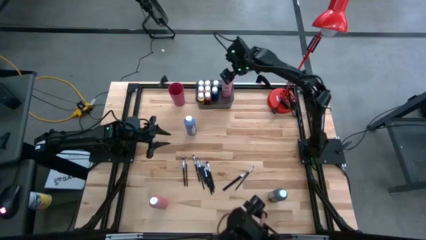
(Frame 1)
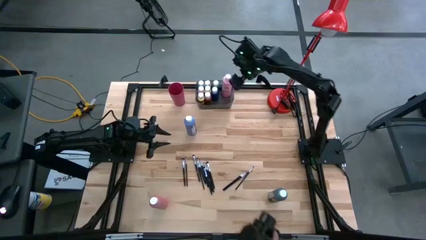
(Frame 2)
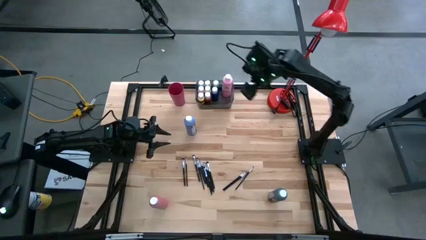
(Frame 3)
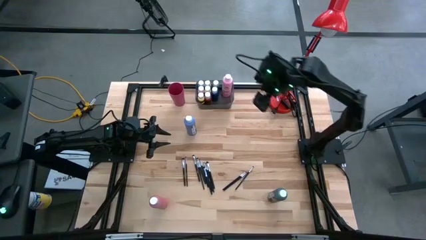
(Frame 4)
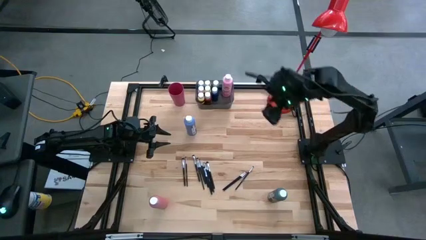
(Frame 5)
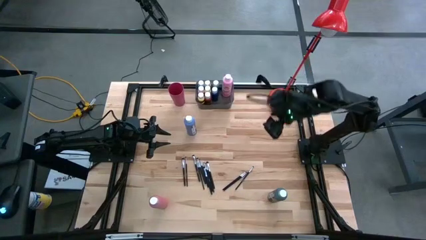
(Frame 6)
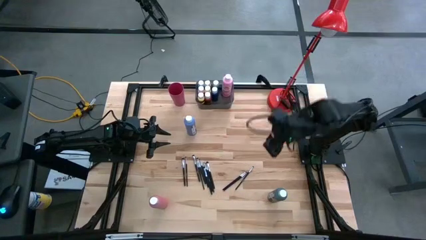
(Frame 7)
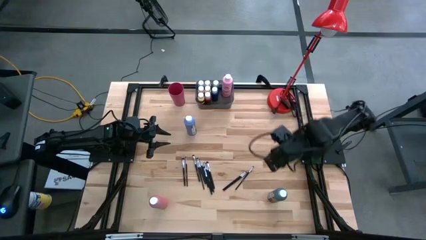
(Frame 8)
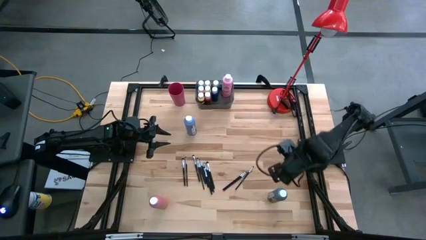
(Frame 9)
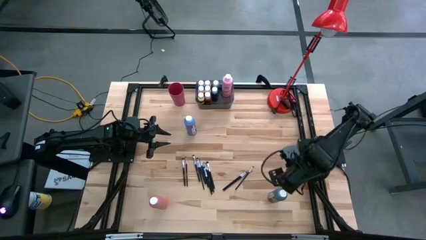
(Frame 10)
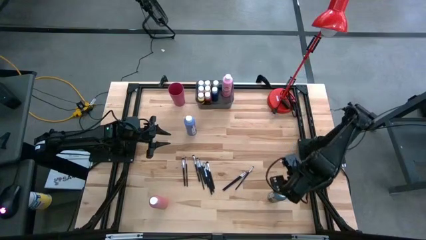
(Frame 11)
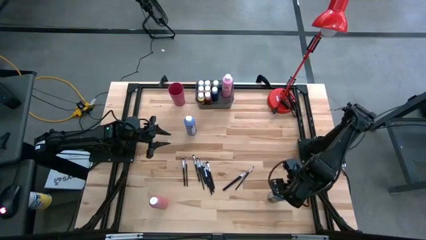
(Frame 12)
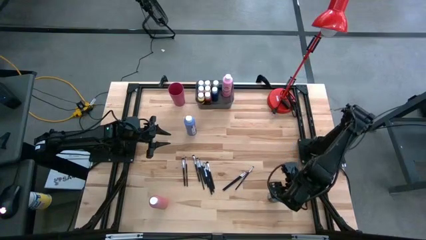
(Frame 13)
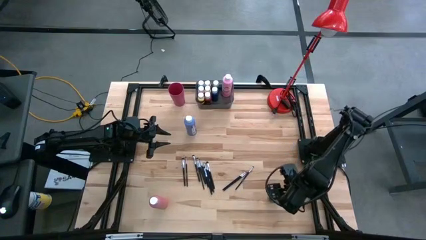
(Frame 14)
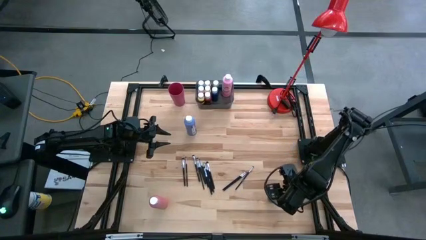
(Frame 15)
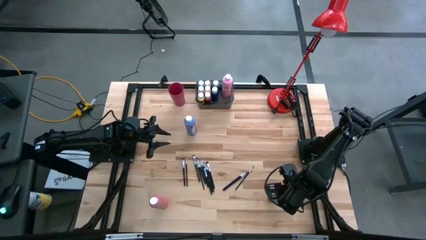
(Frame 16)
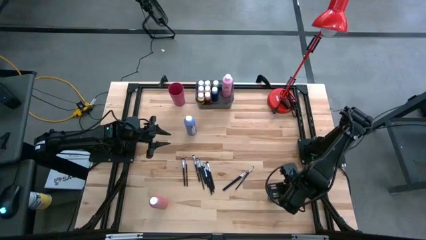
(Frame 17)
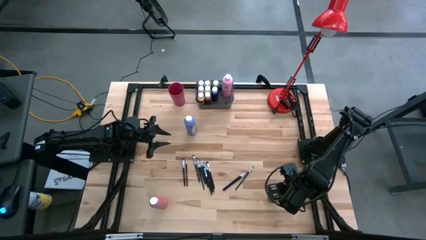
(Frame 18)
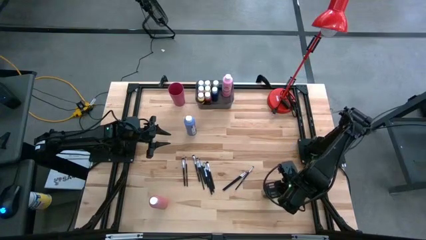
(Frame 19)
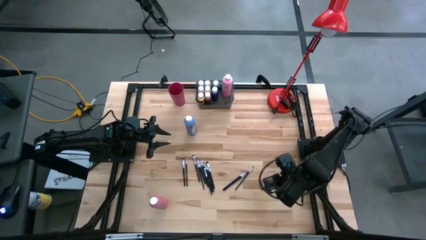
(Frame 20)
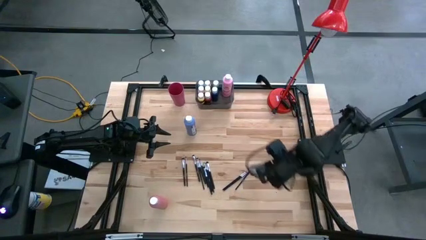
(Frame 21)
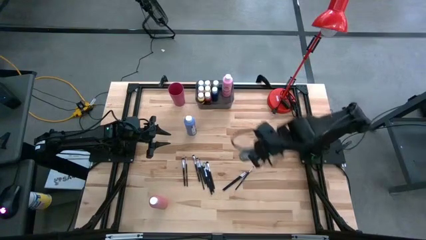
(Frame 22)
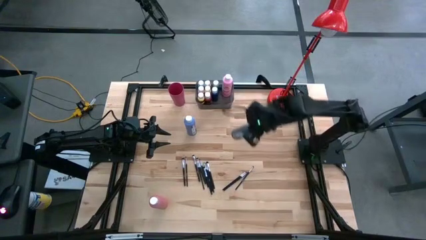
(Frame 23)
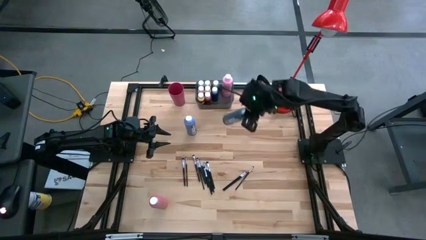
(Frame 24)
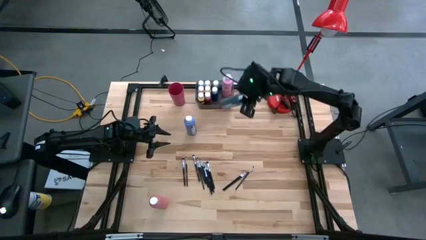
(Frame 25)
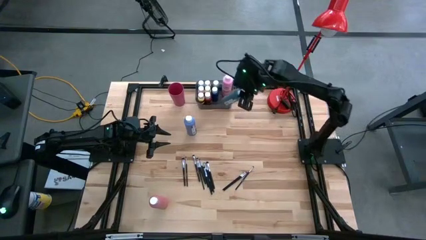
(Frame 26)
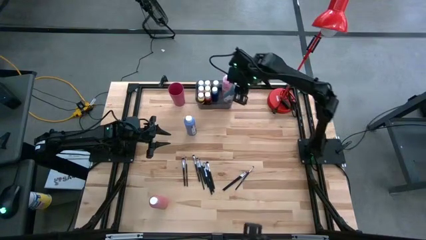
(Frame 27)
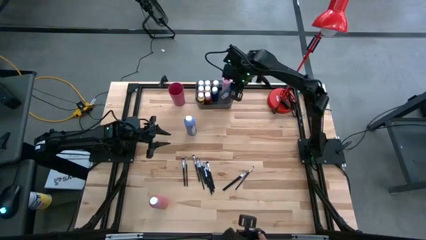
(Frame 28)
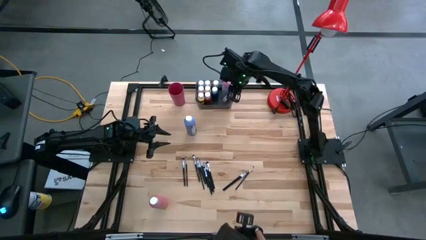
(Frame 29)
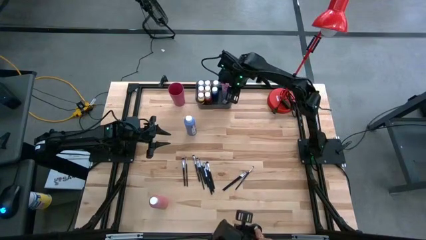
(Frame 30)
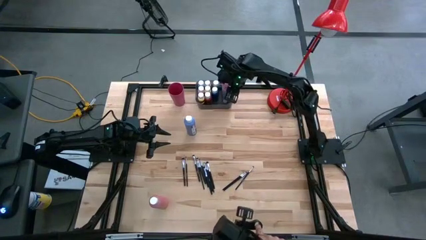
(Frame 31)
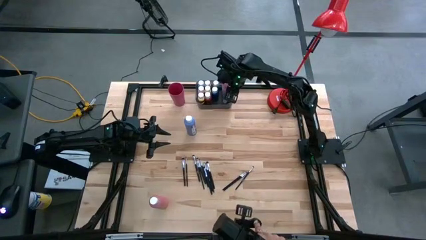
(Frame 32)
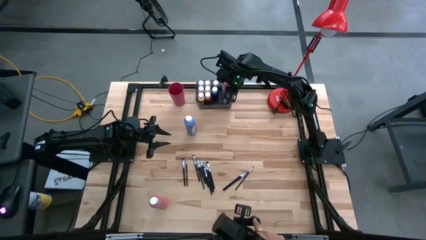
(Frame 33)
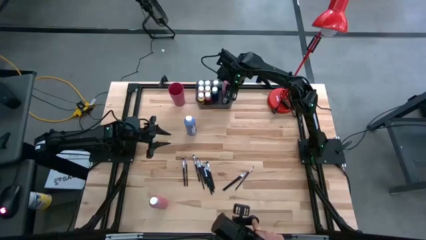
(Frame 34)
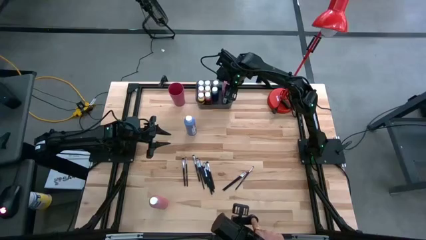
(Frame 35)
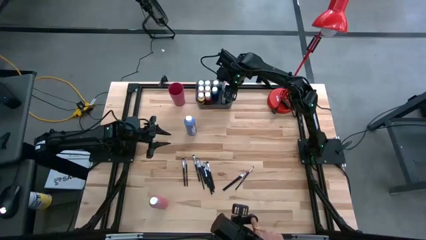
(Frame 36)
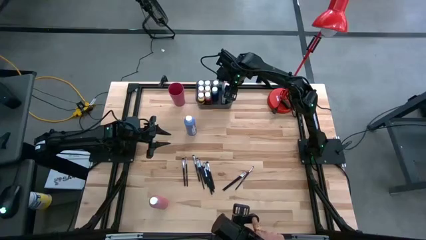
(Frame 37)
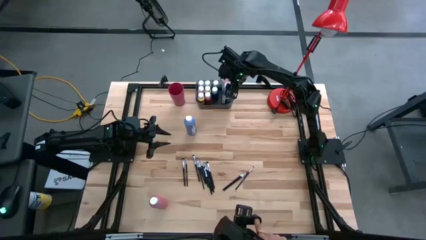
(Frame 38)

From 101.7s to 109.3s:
Task: Pick & Place Paint Supplies
Put the dark blue pain bottle into the black bin

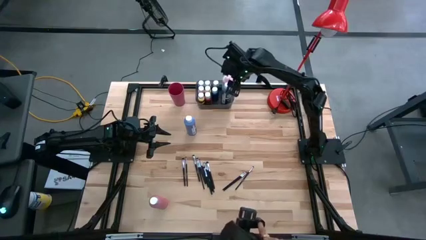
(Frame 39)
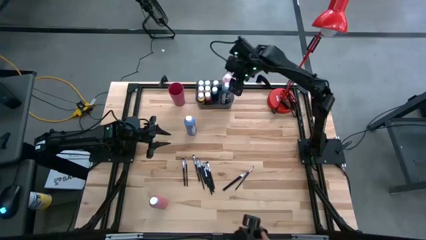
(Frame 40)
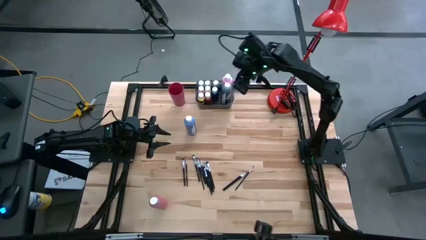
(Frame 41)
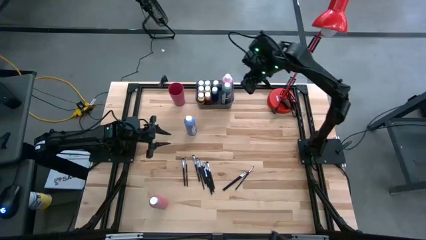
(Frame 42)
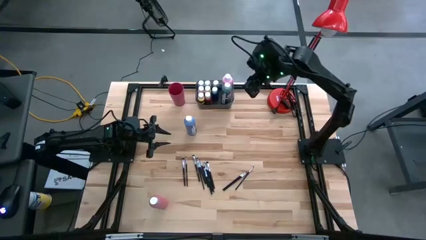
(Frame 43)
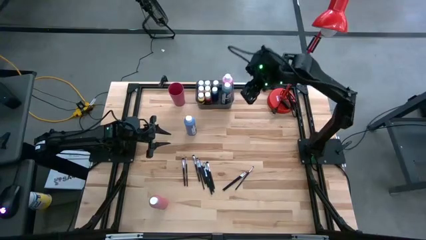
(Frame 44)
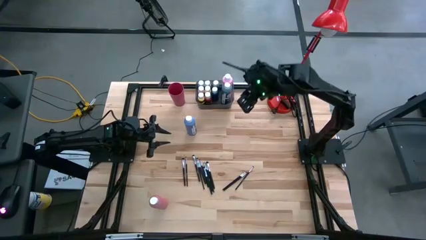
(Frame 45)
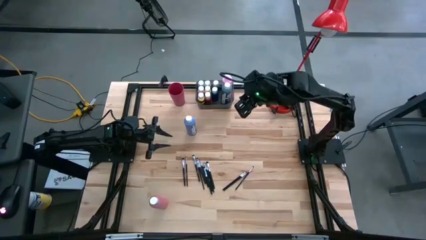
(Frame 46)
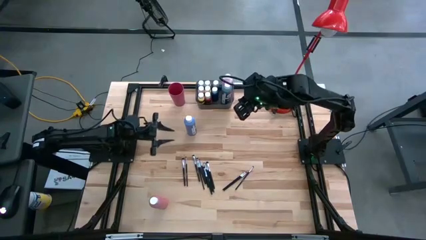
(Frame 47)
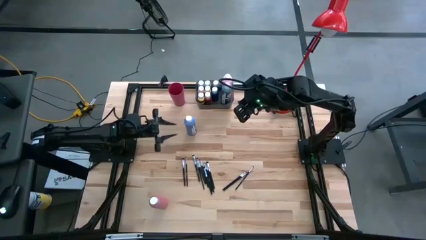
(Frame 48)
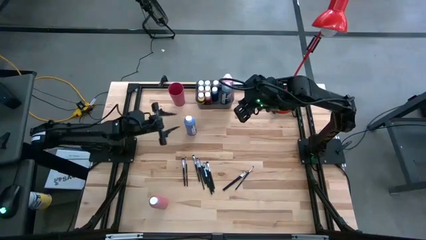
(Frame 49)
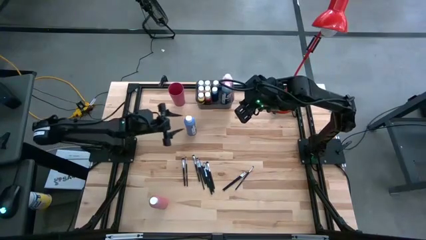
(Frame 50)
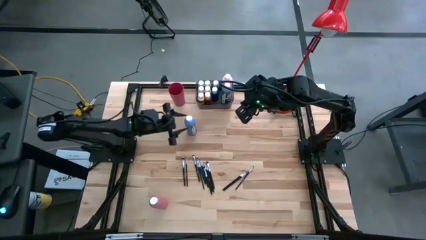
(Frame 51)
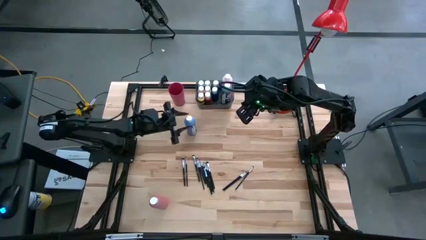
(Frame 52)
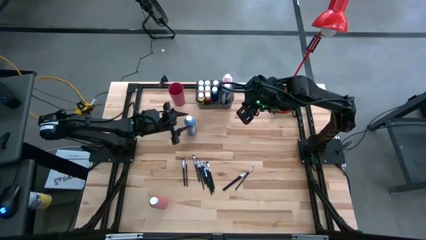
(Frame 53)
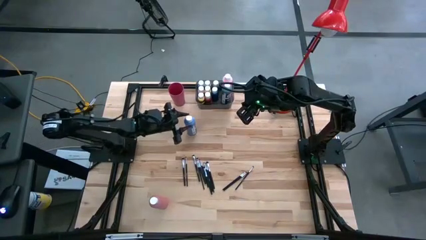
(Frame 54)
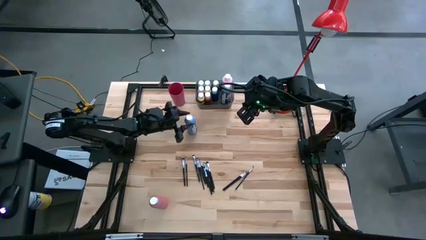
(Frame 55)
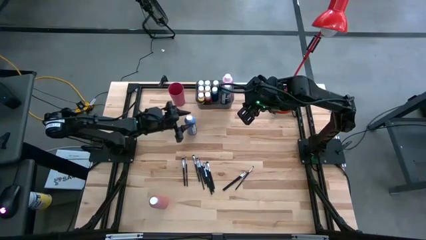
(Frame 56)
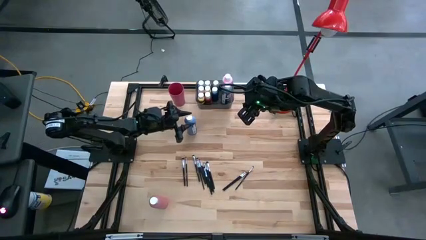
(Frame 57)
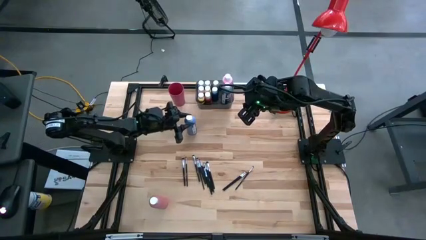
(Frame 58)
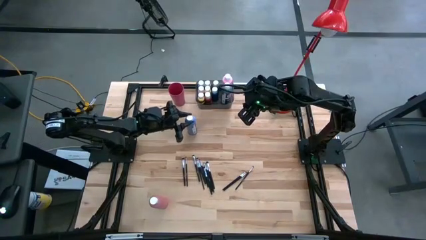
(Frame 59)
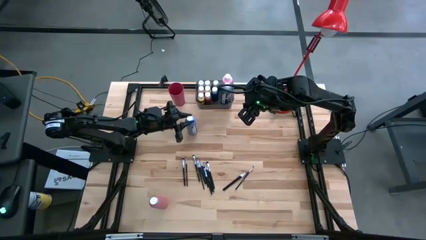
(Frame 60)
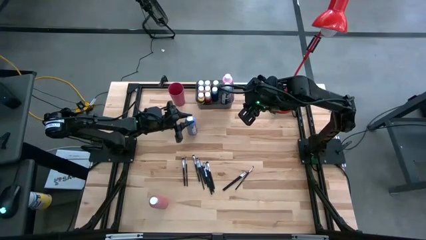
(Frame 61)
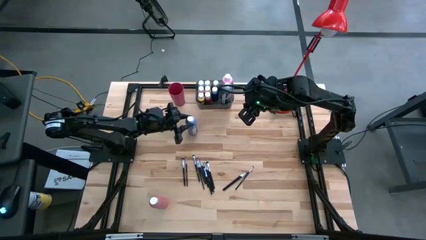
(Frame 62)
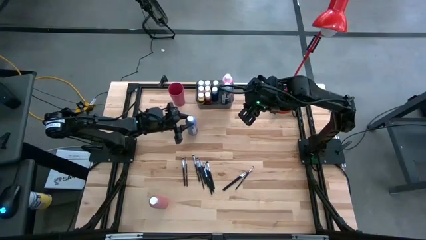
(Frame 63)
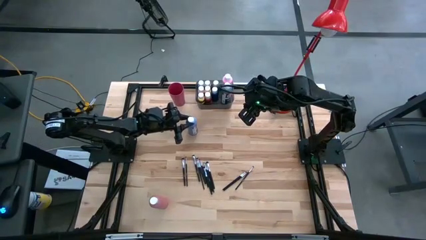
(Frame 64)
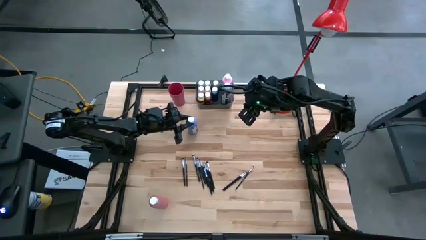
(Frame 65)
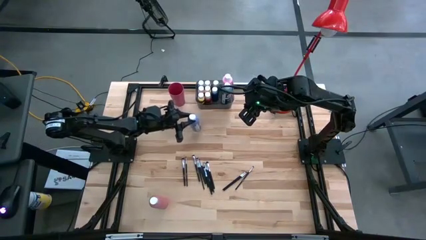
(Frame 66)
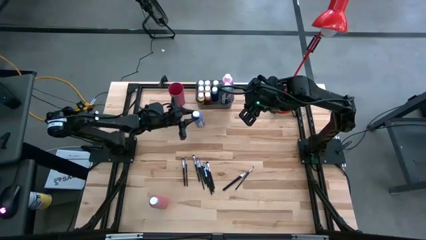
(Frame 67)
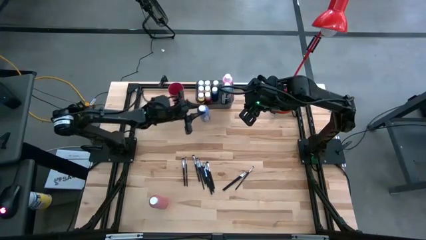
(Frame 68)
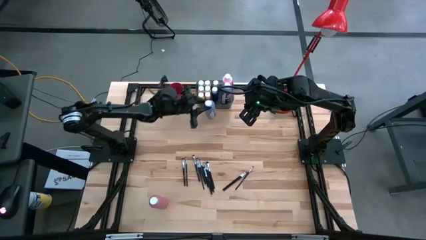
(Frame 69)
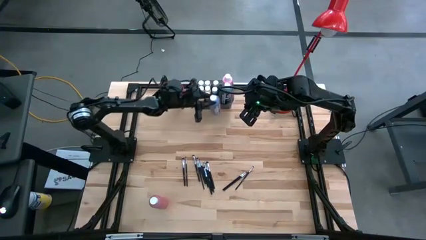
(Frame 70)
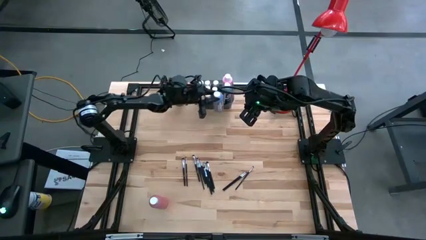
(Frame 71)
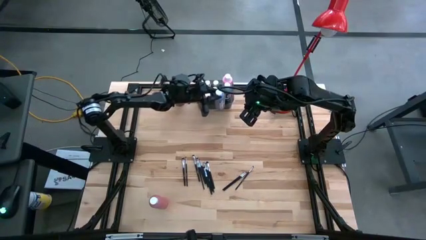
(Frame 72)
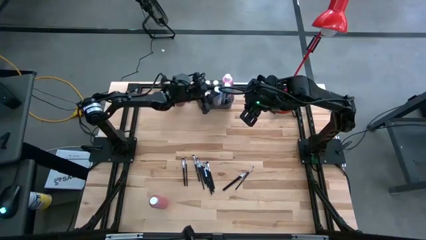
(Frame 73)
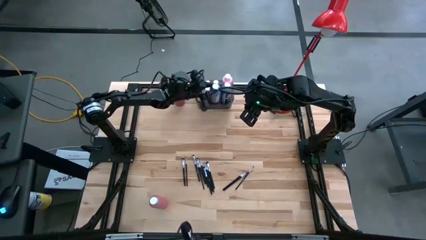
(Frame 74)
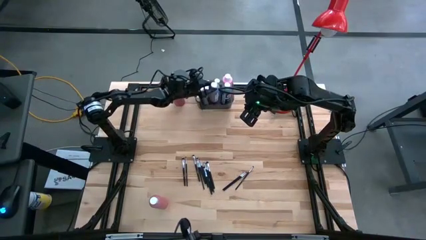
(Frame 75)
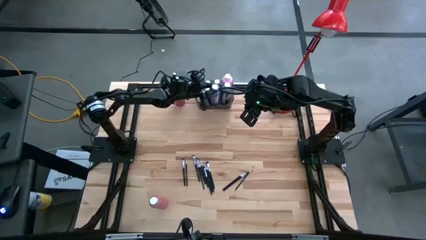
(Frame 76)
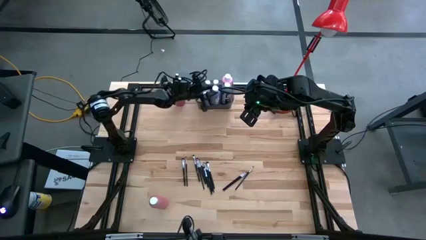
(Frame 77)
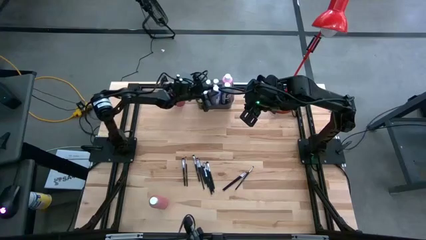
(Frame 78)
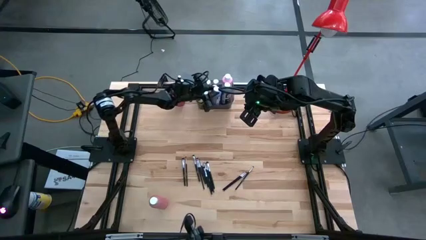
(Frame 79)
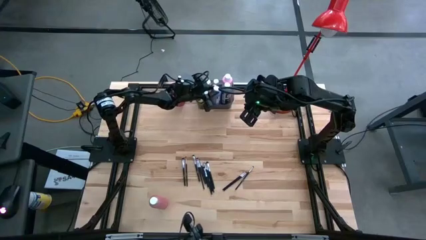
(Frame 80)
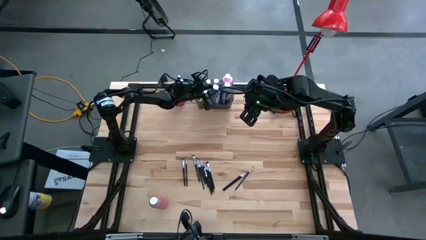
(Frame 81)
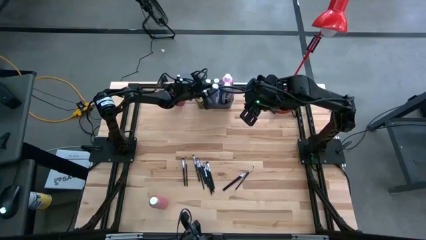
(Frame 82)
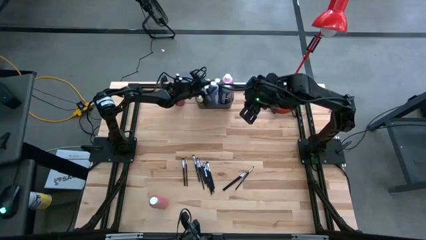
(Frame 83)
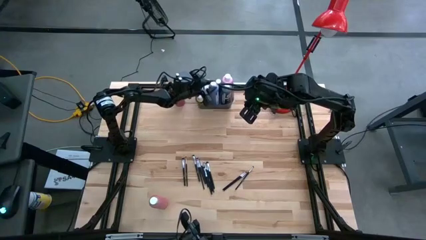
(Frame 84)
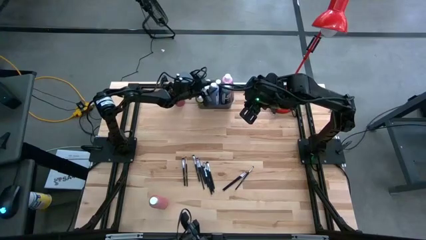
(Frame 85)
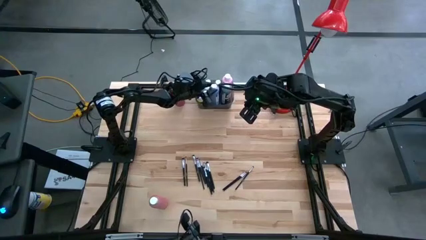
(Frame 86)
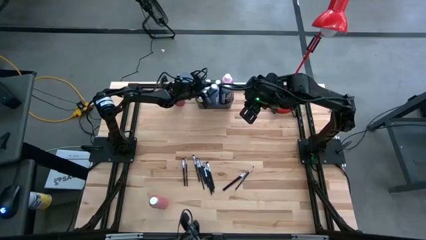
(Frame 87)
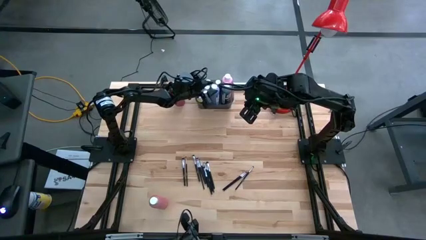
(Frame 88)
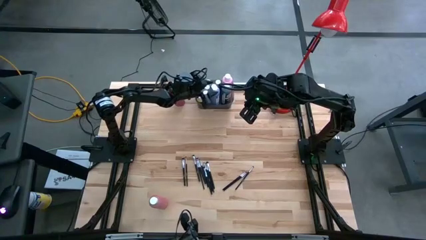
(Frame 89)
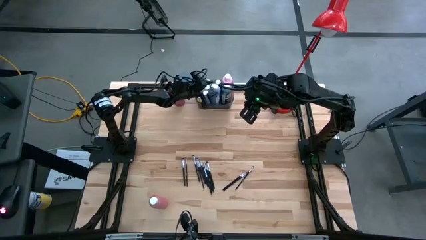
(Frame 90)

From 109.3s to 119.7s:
Put the blue paint bottle into the black bin
